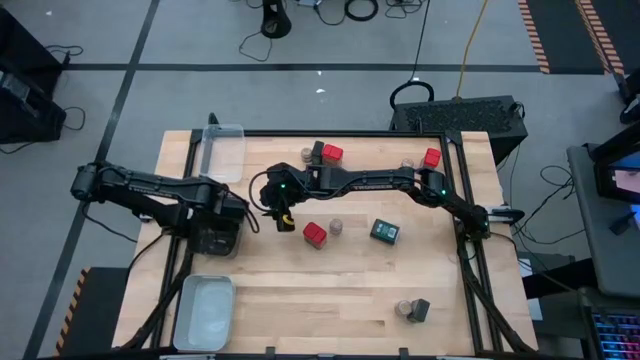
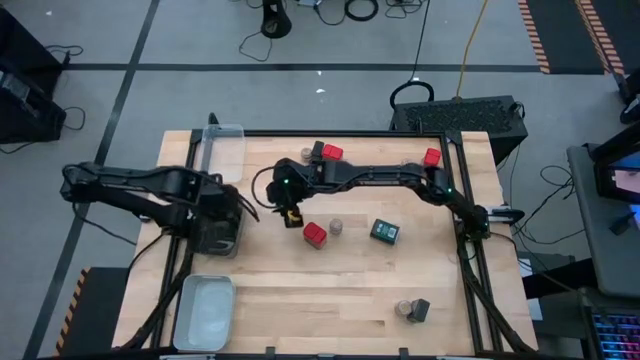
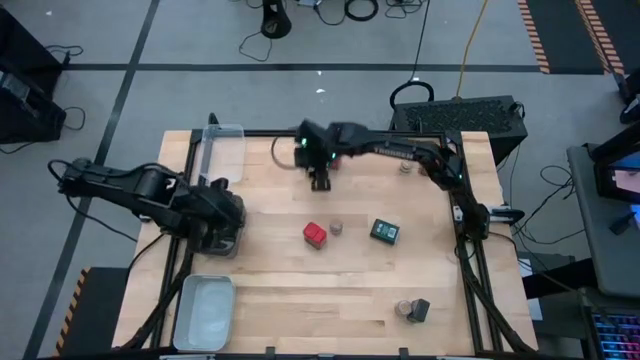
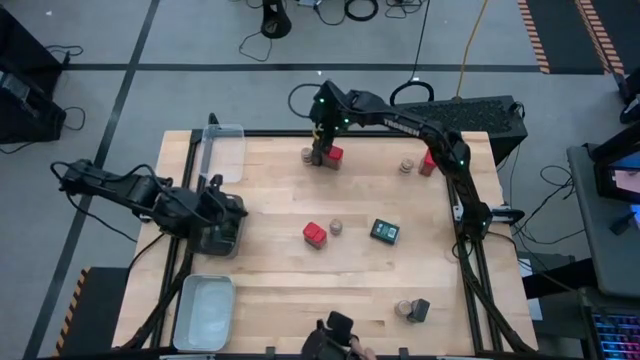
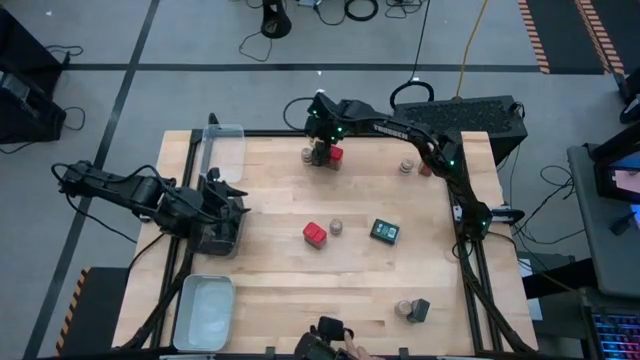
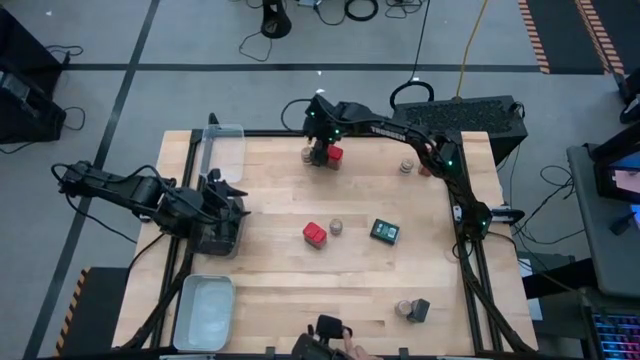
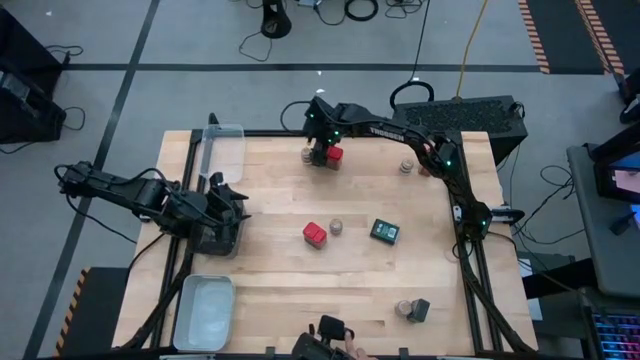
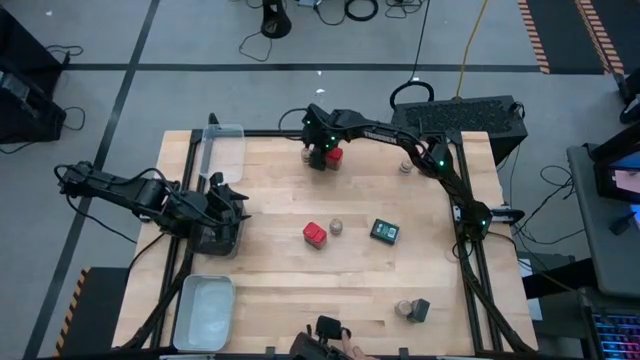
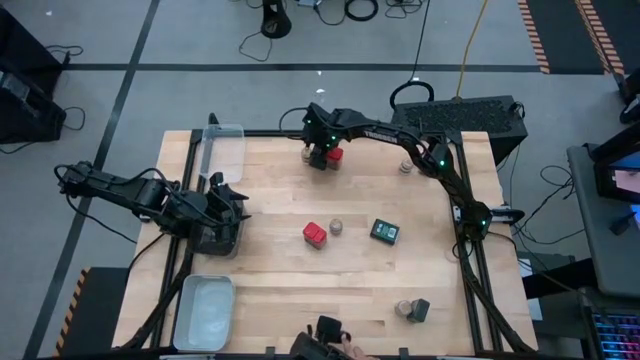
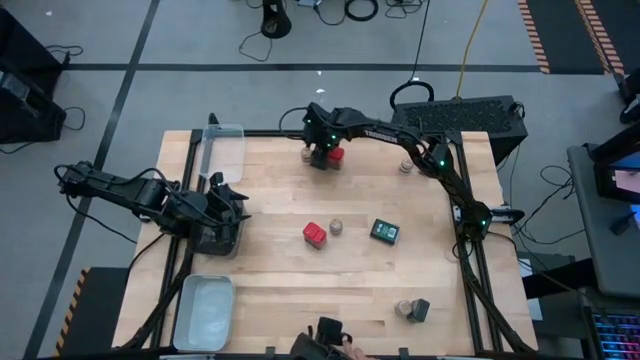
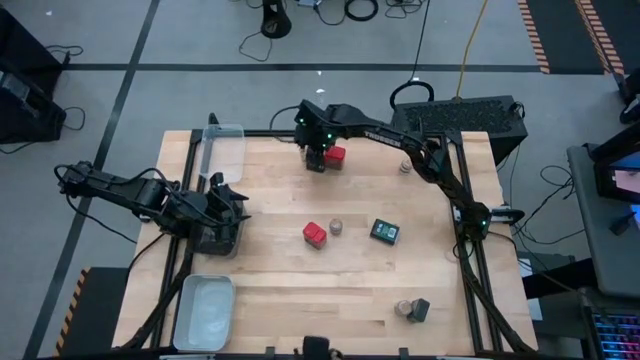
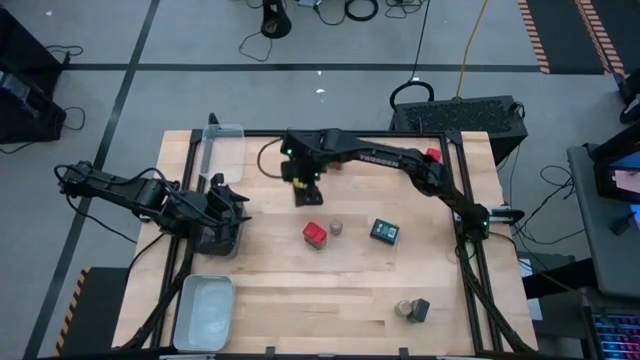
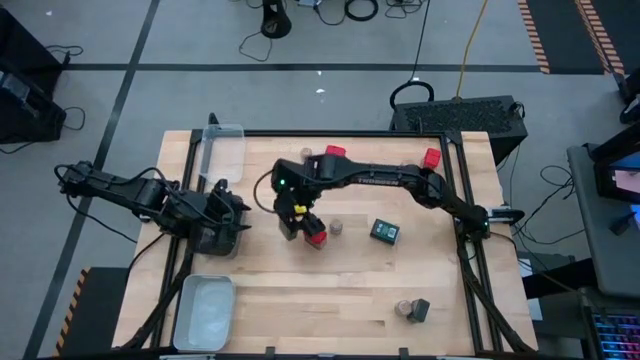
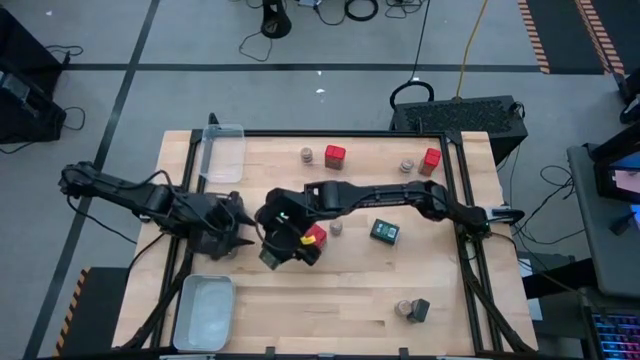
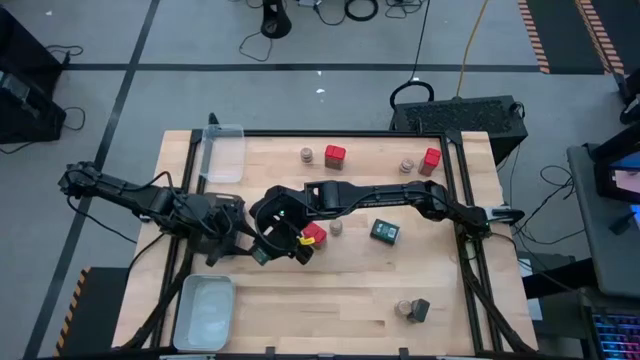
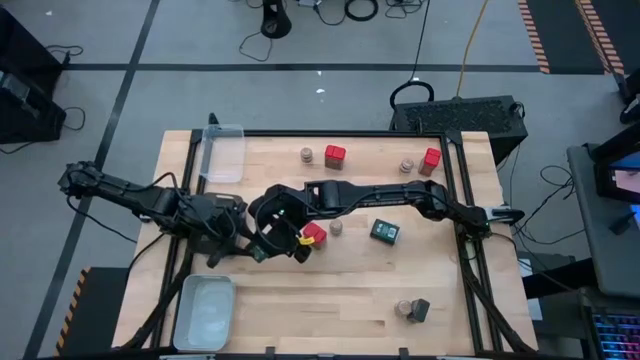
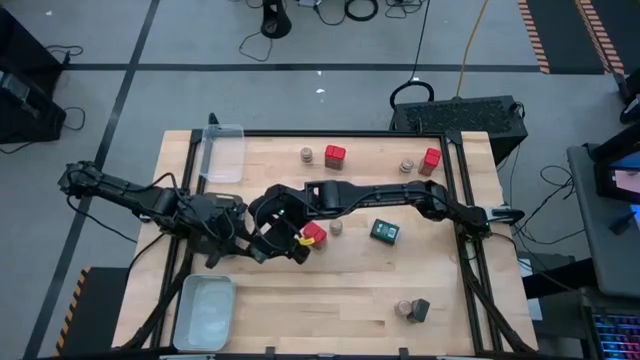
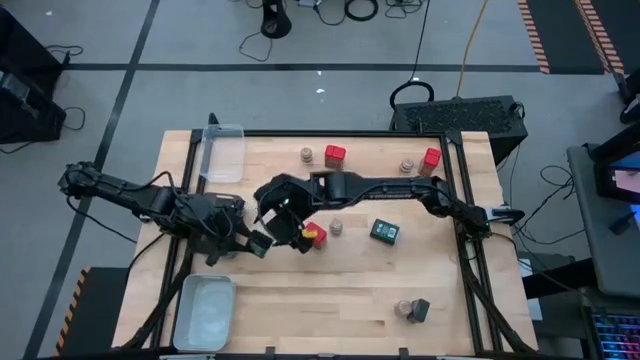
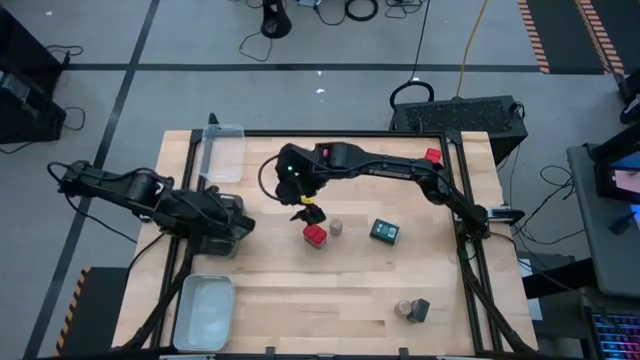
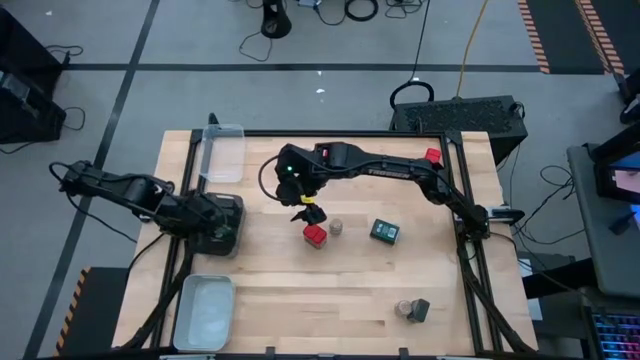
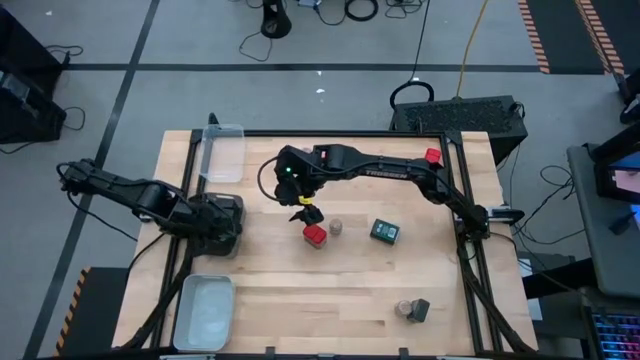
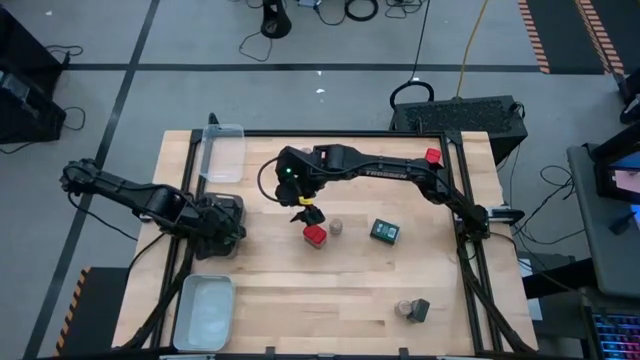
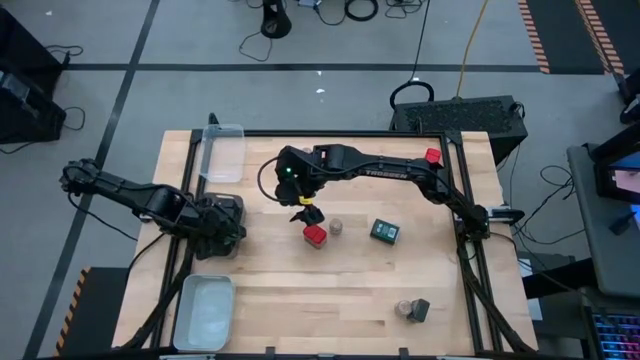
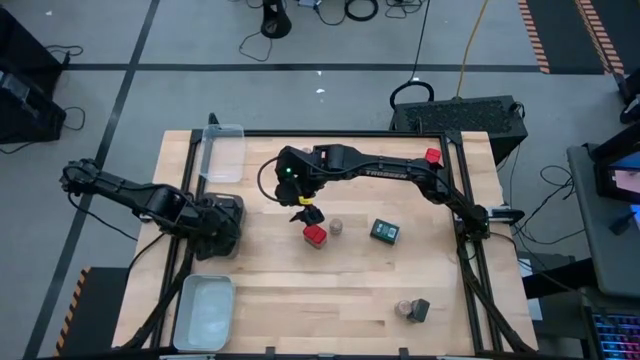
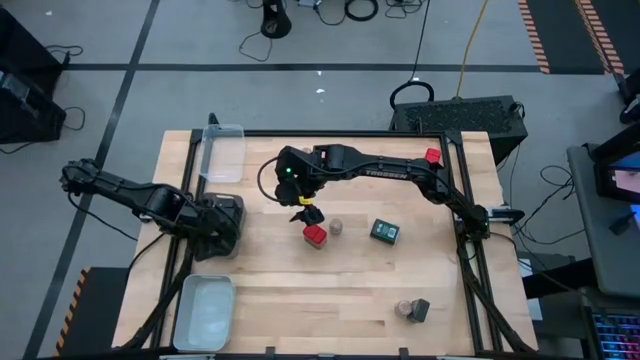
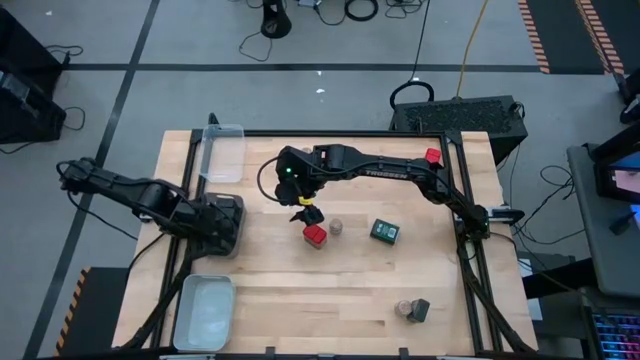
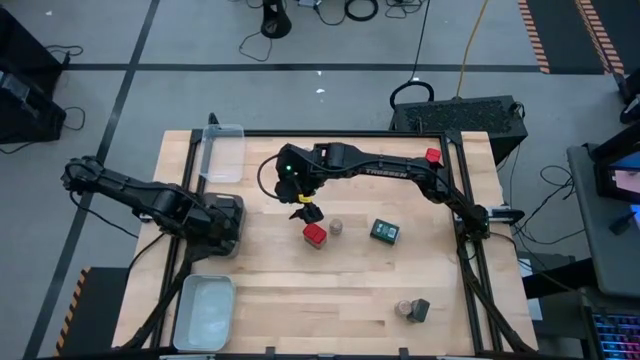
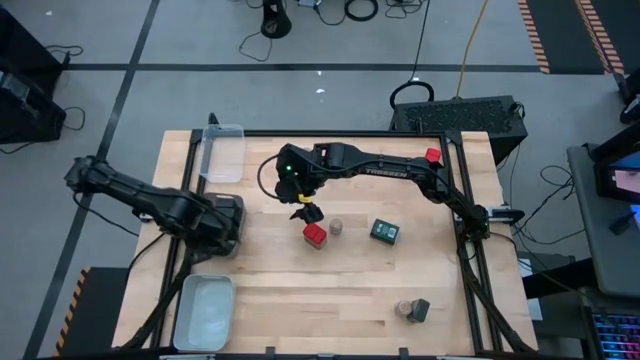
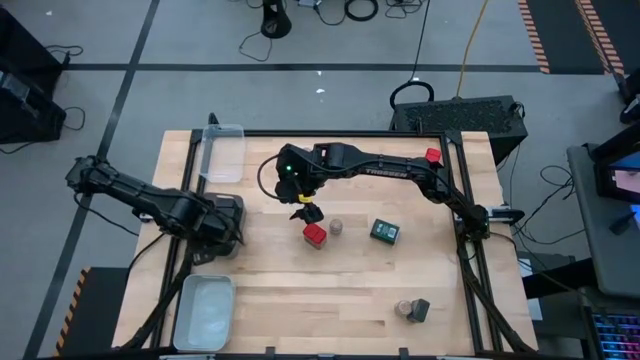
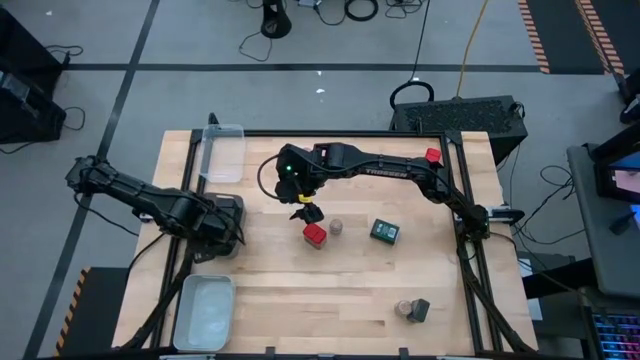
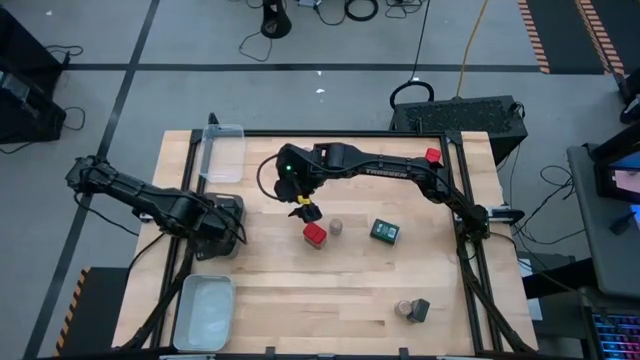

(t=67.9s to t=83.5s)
Task: Sort spices by type
Put the black seasoning can into the black bin

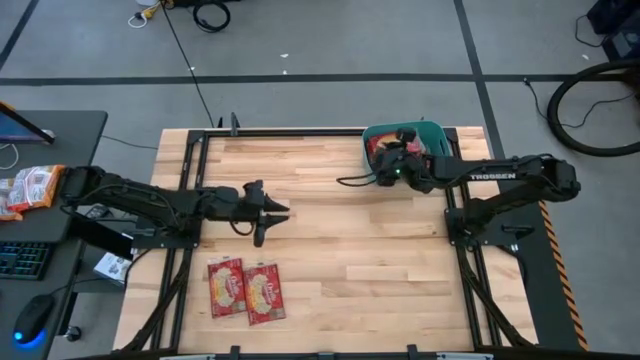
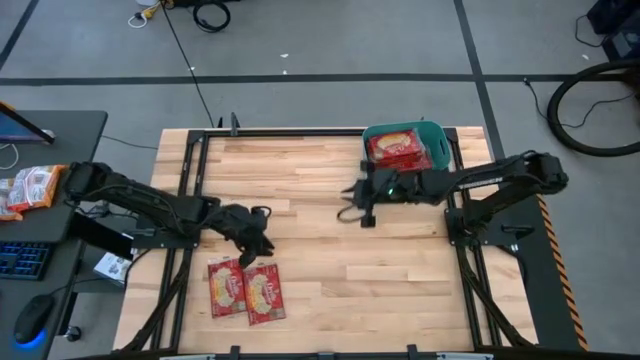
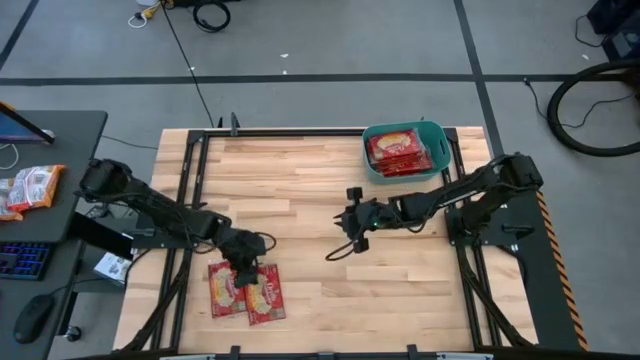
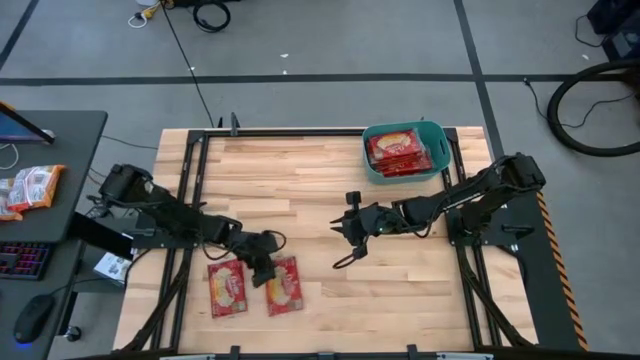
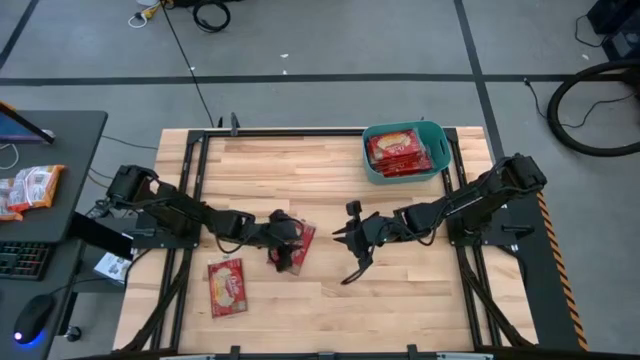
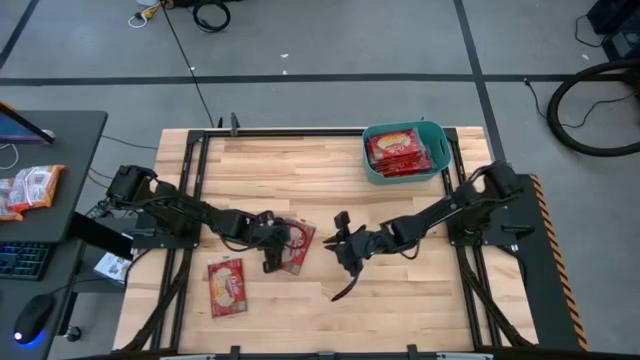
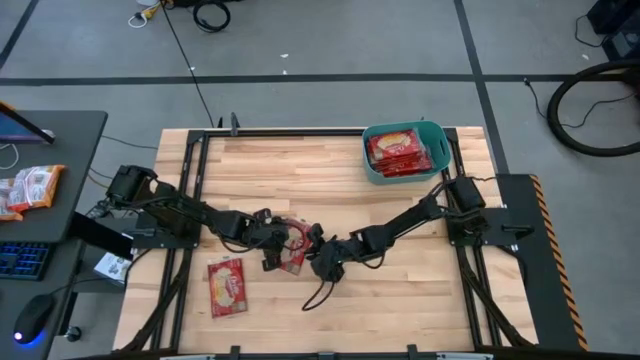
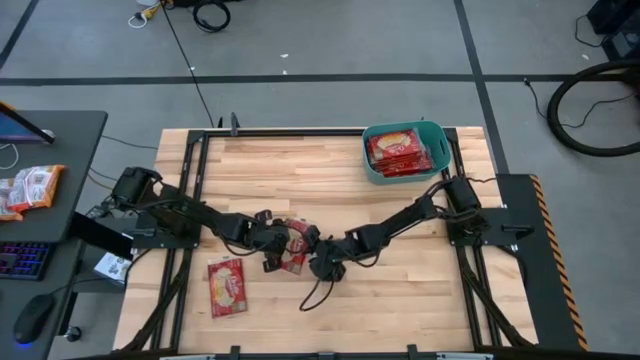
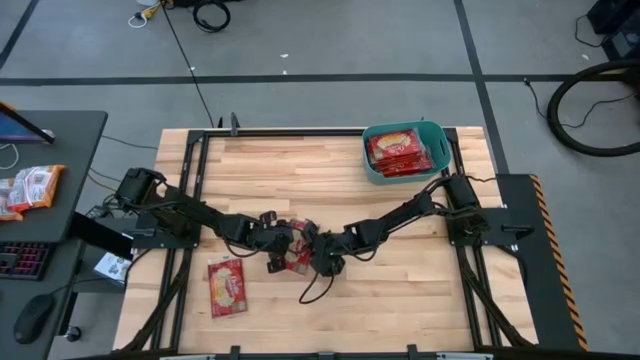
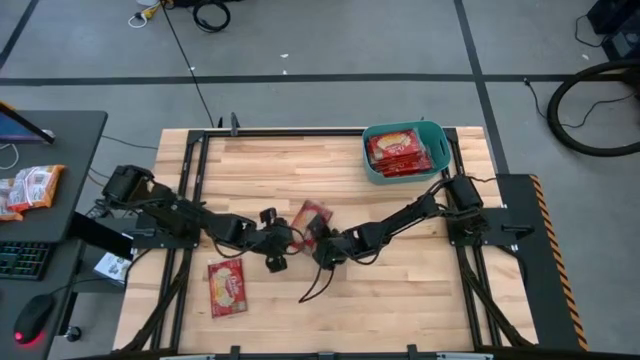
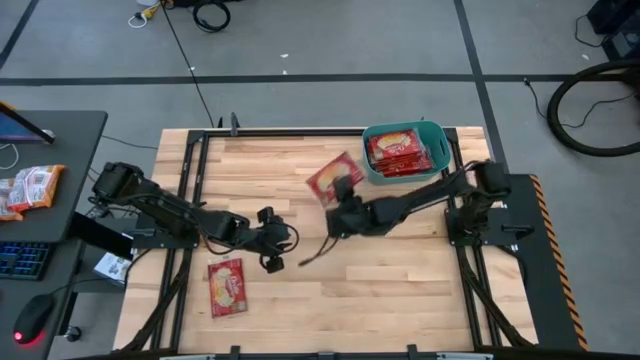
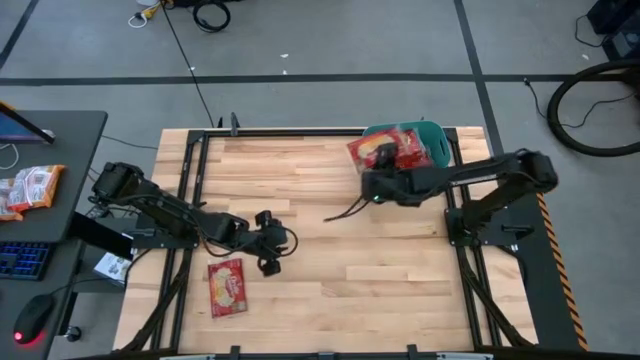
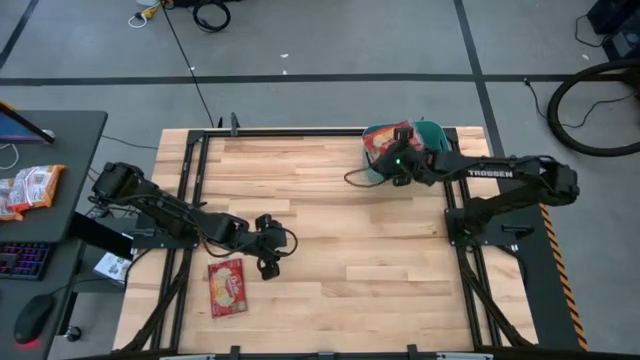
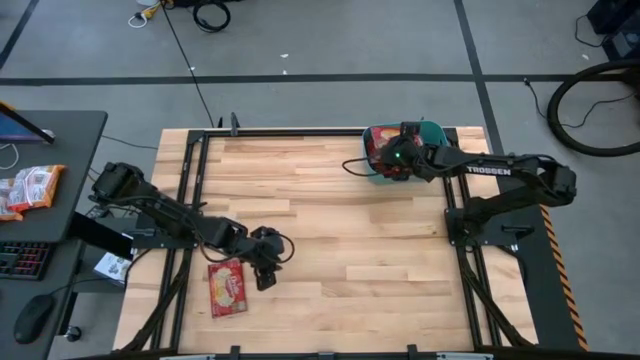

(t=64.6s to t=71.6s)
Task: Sort popcorn bags into baskets
Put the red popcorn bag into the green bin
